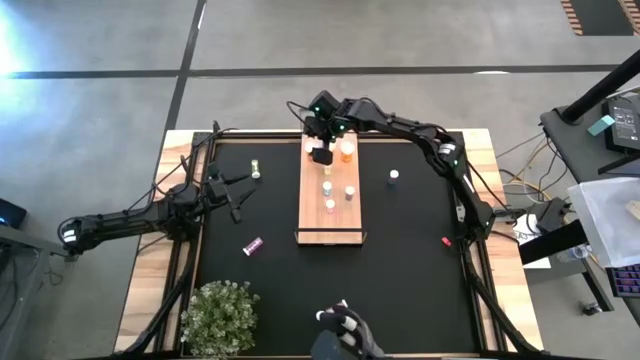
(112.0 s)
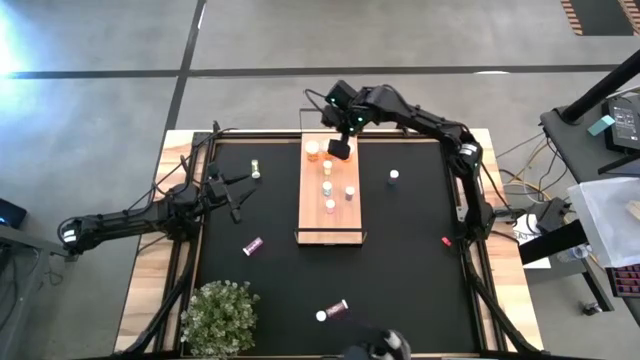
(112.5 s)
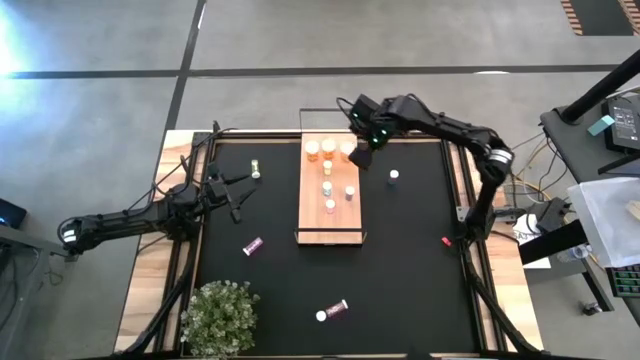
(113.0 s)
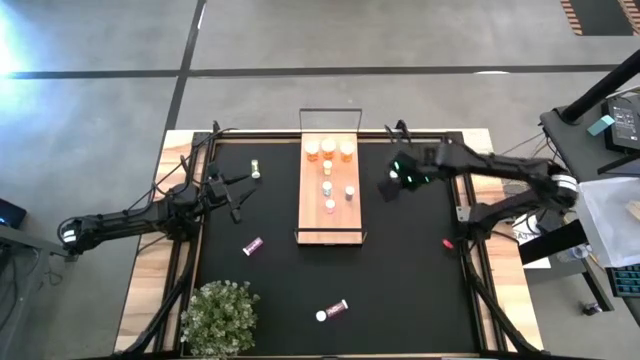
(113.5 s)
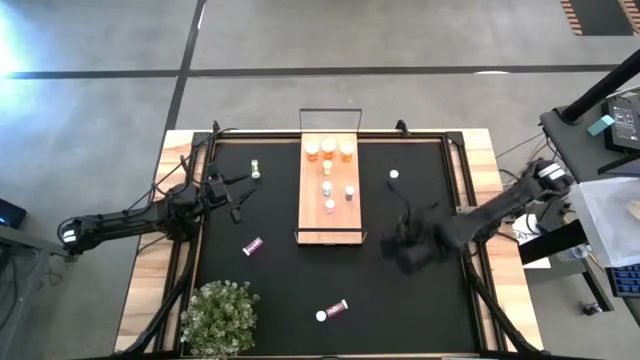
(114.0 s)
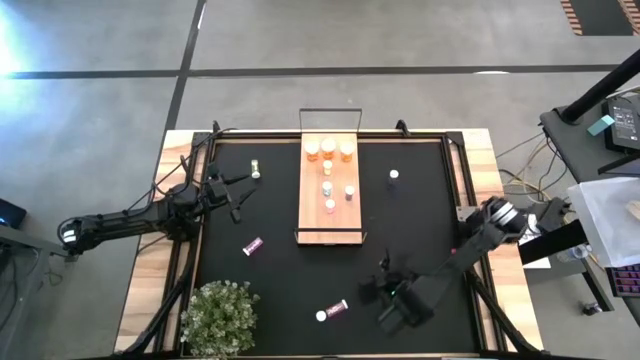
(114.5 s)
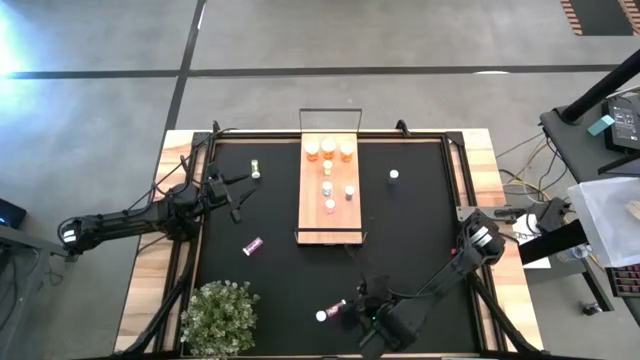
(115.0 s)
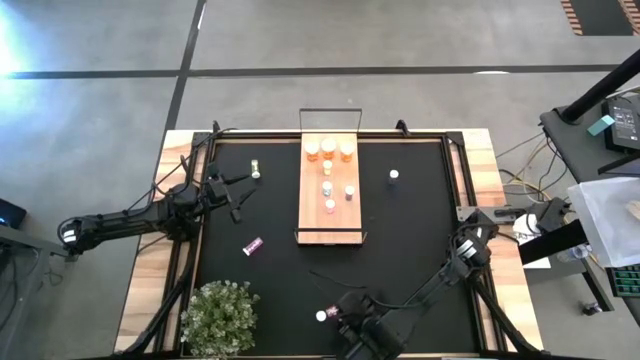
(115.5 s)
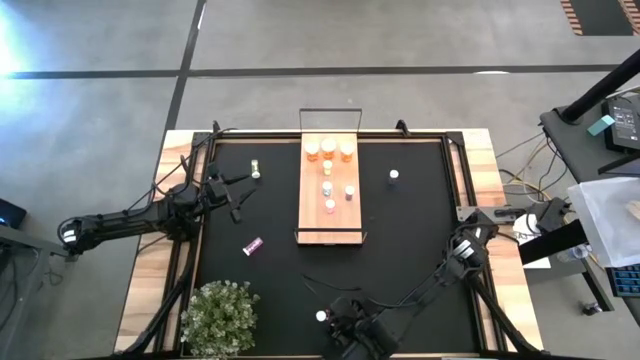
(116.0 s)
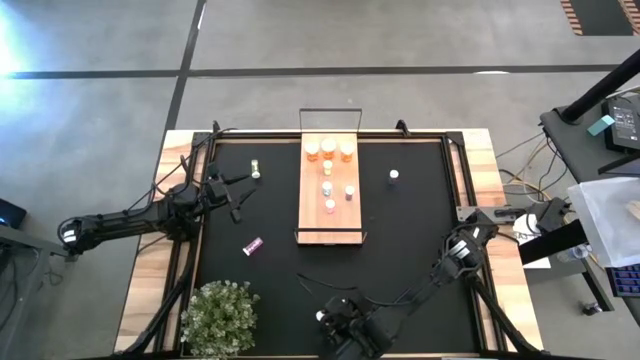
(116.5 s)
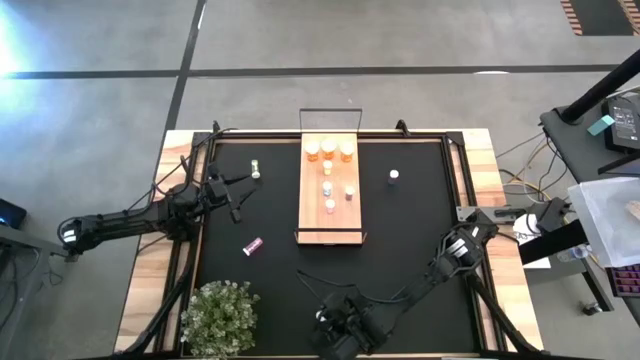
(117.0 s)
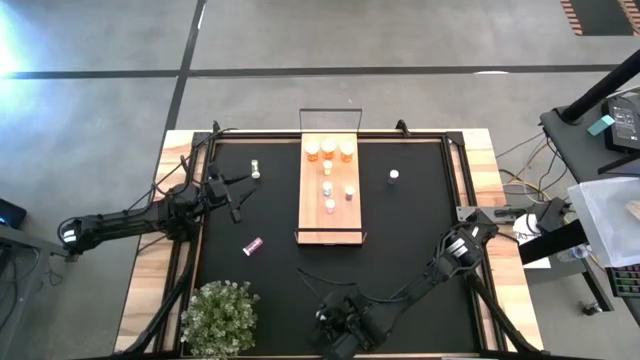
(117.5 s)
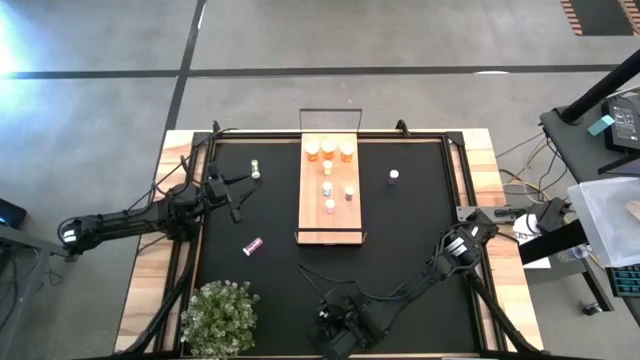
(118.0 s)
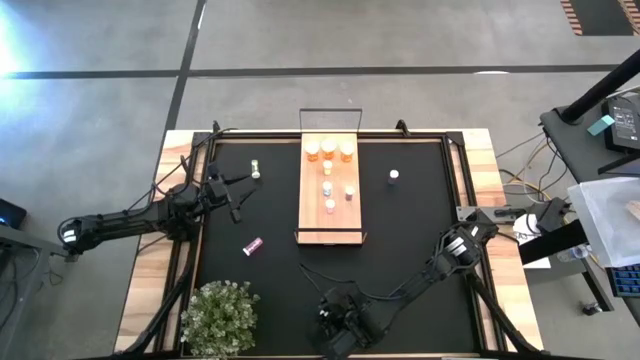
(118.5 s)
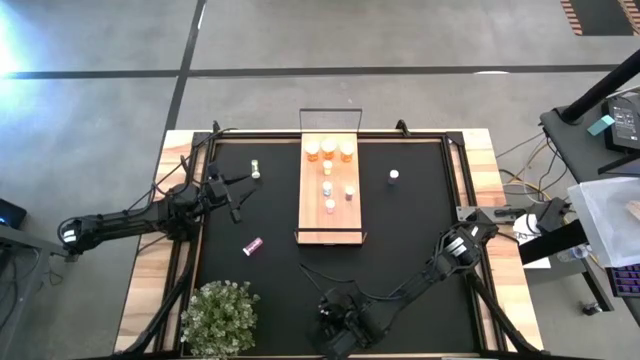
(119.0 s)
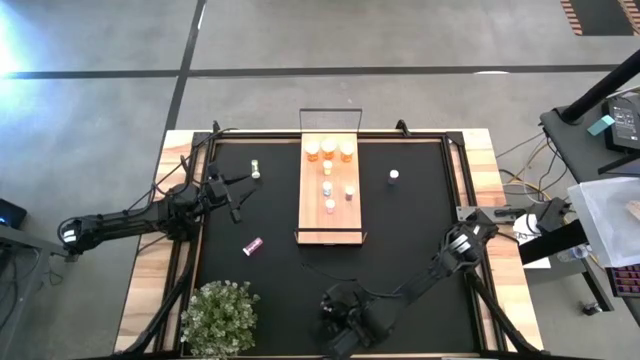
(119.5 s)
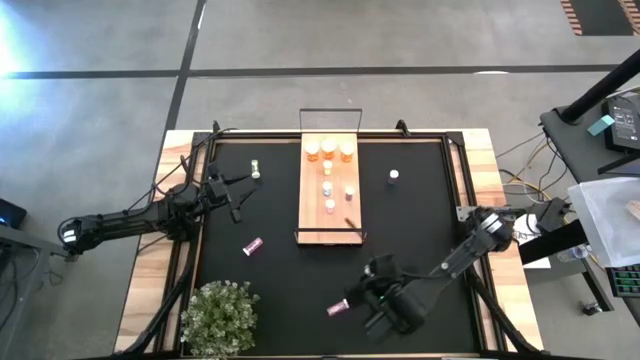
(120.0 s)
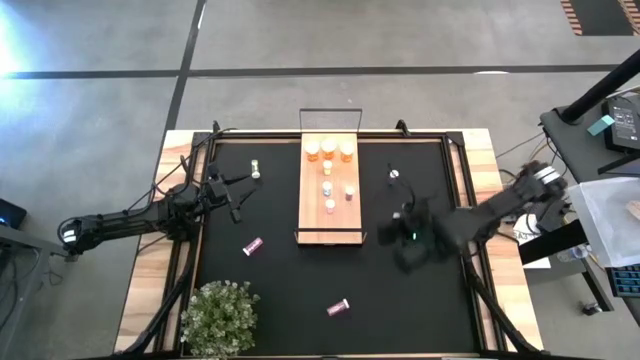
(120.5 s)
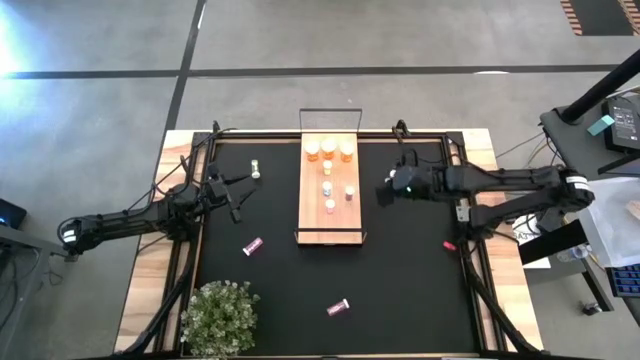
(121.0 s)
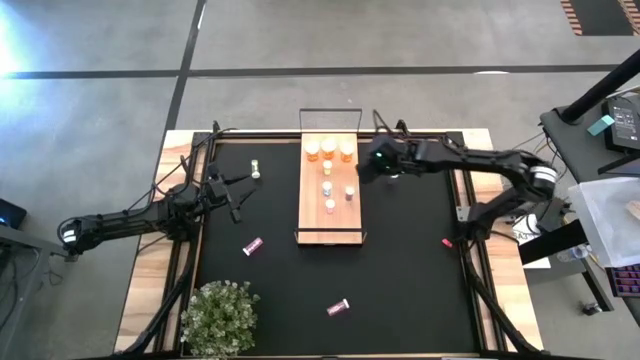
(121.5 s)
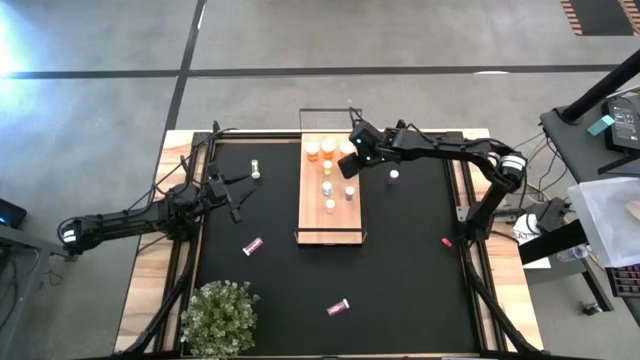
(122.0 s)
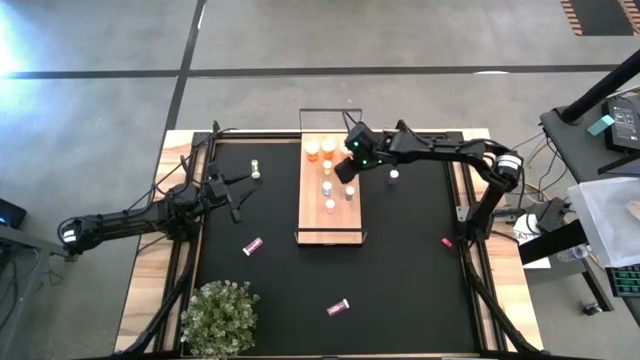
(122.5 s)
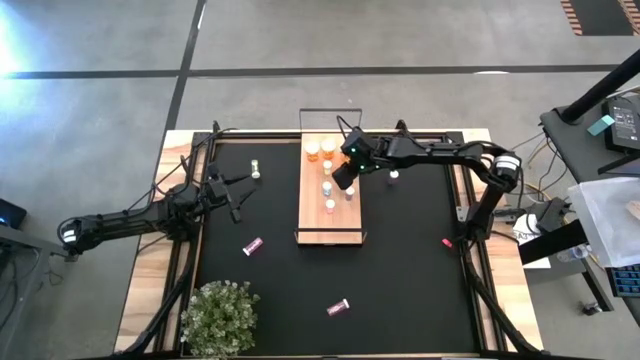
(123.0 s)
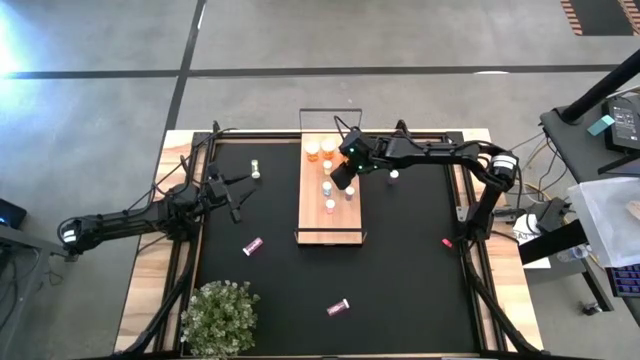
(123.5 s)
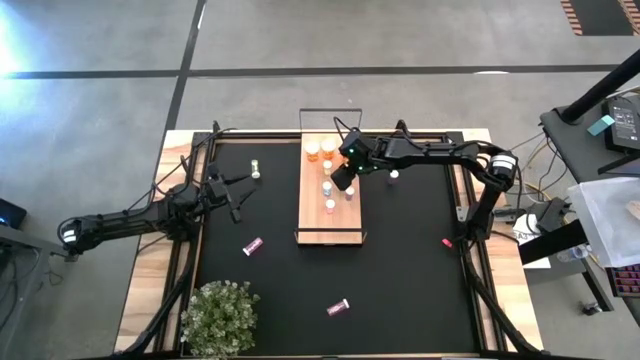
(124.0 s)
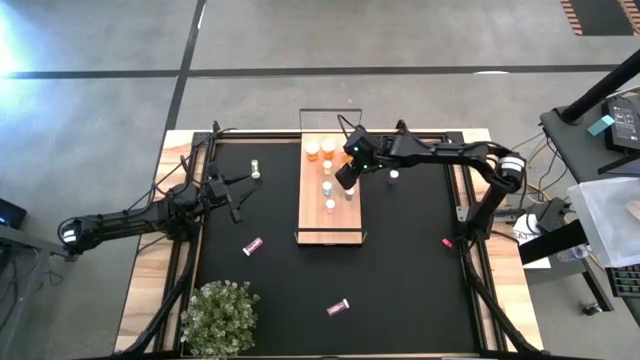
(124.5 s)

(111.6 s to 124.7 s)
Task: Pick and place medicine bottles onto shelf by color
Put the bottom yellow medicine bottle on the shelf aligned with the other yellow medicine bottle

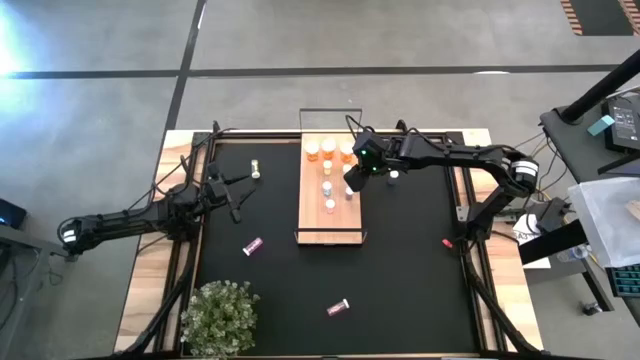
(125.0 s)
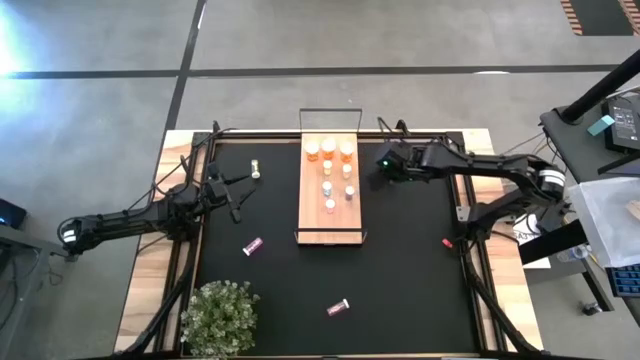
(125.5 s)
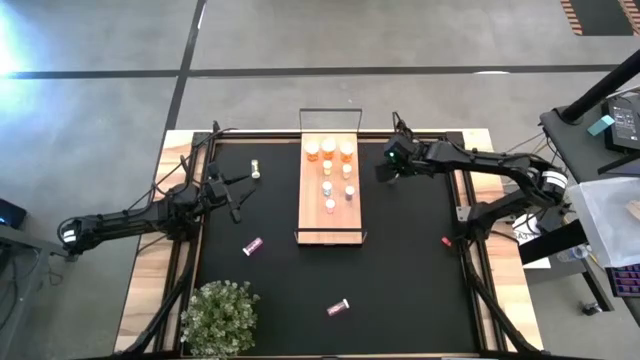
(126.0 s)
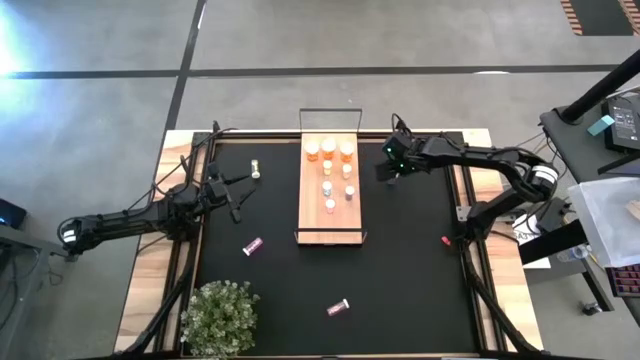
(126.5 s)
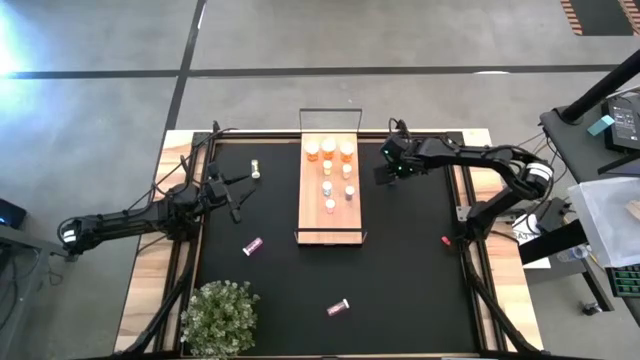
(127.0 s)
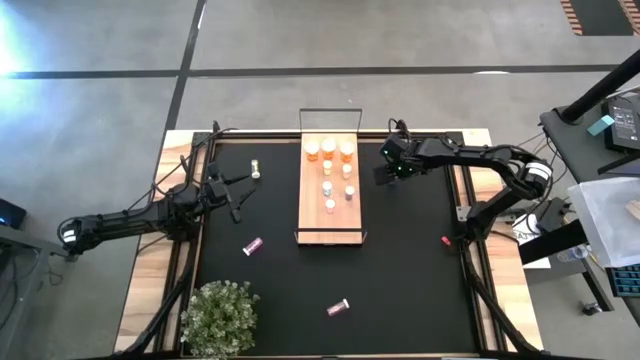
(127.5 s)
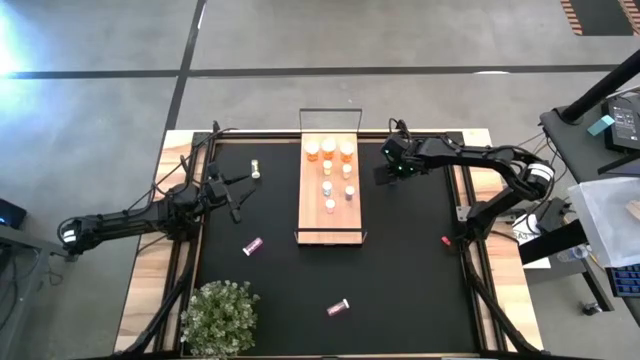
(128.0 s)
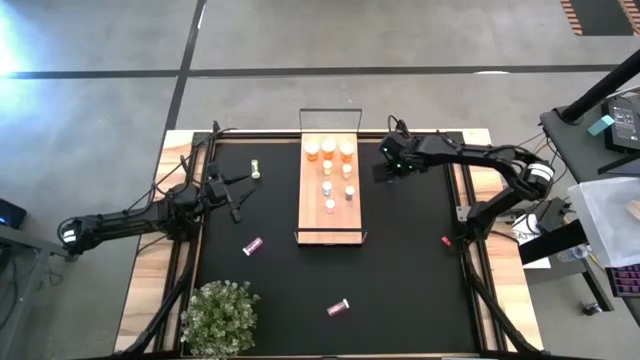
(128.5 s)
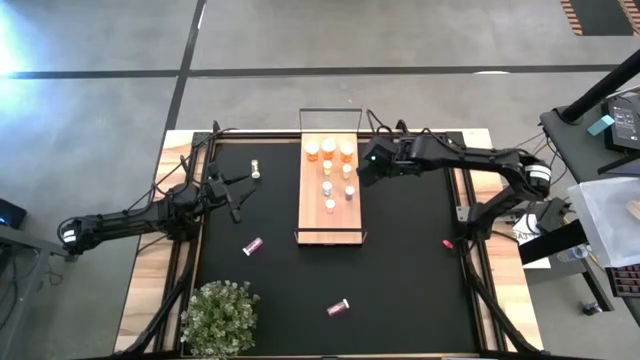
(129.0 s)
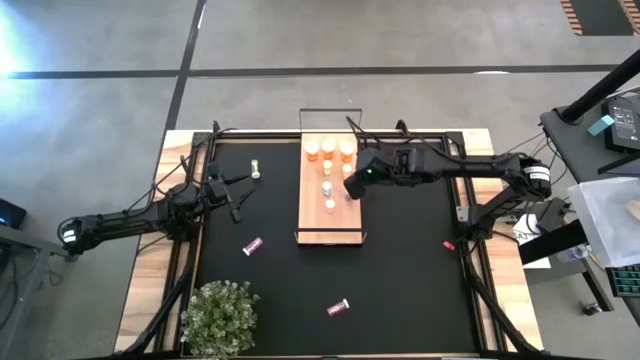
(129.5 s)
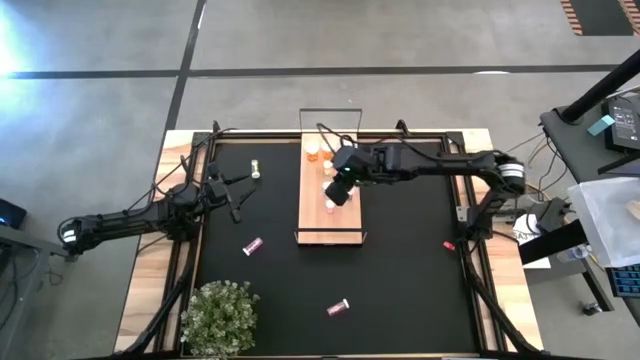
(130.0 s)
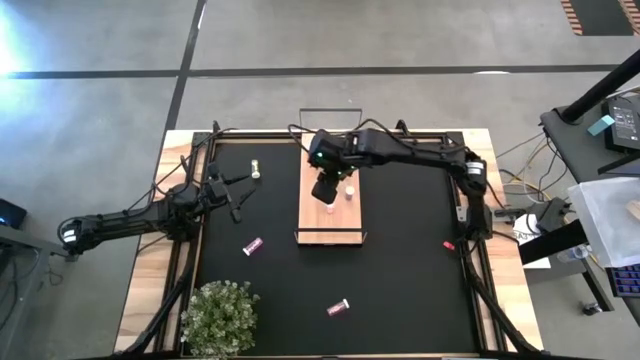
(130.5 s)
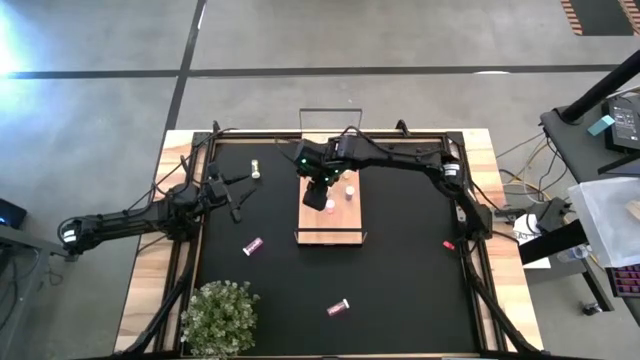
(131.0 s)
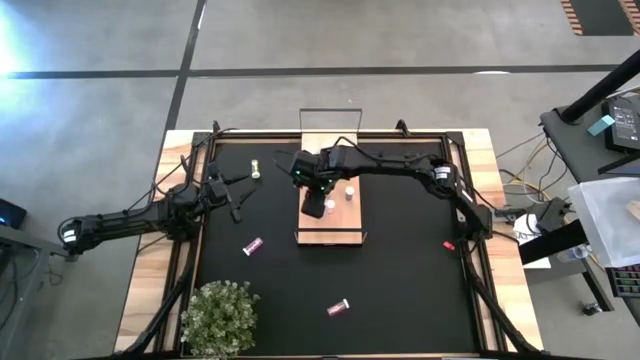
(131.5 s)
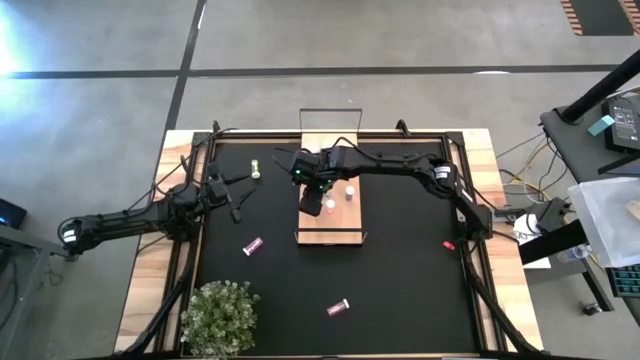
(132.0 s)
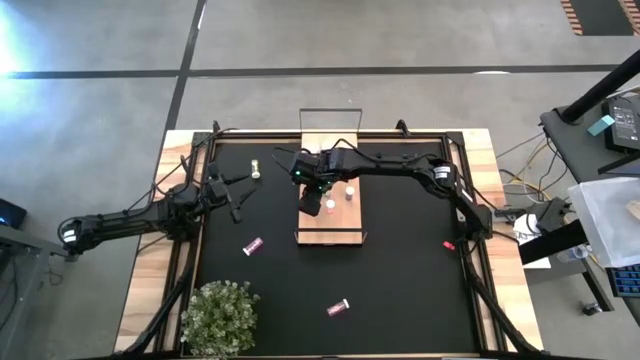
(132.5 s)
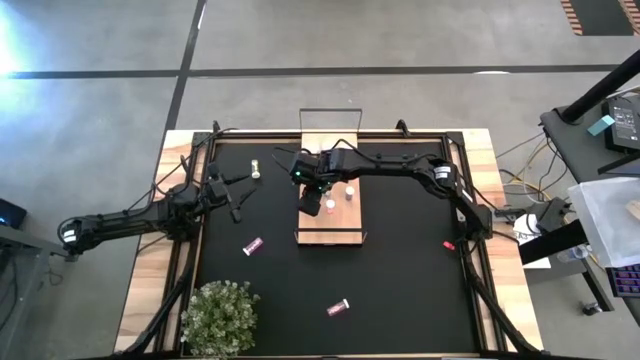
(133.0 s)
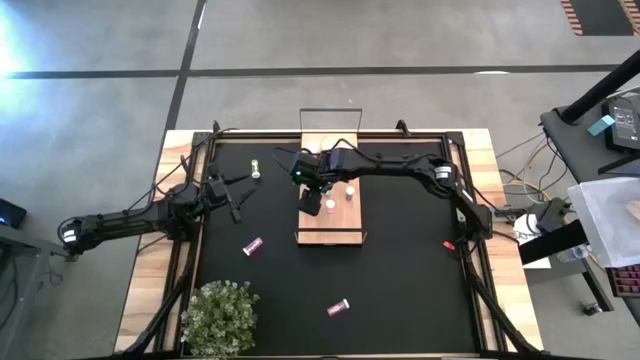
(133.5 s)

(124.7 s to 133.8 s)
Put the blue medicine bottle on the shelf aligned with the other blue medicine bottles
